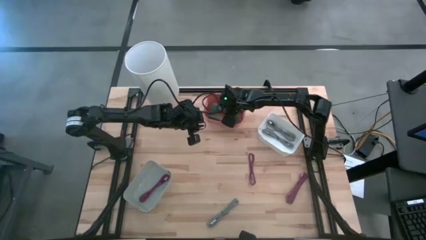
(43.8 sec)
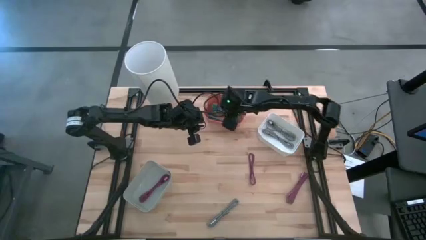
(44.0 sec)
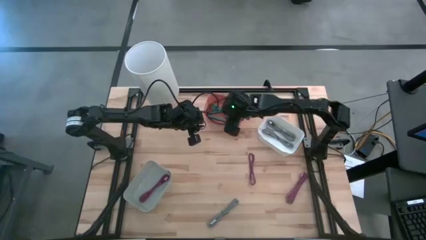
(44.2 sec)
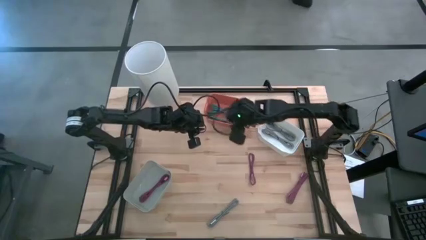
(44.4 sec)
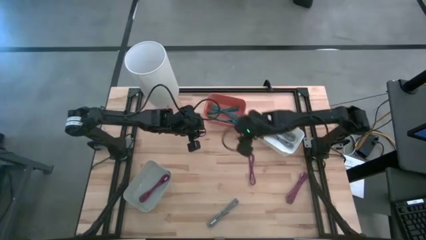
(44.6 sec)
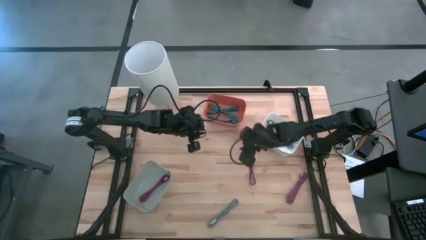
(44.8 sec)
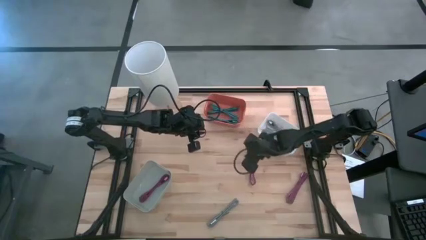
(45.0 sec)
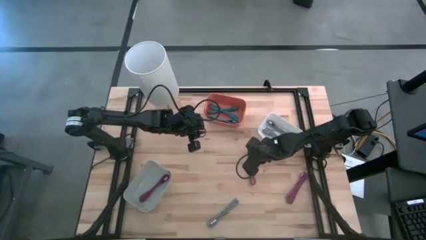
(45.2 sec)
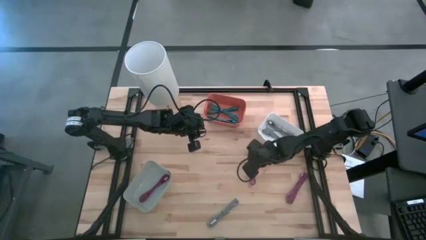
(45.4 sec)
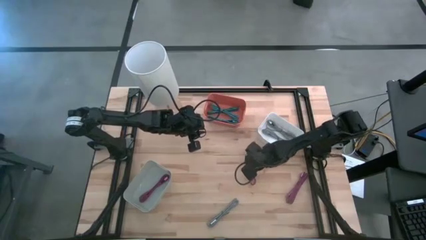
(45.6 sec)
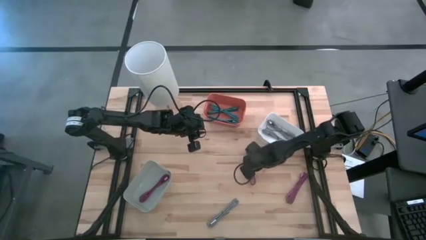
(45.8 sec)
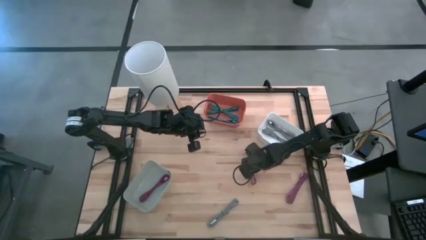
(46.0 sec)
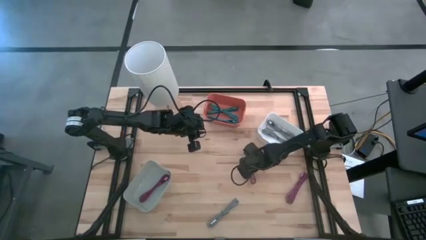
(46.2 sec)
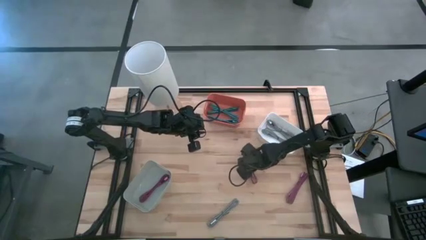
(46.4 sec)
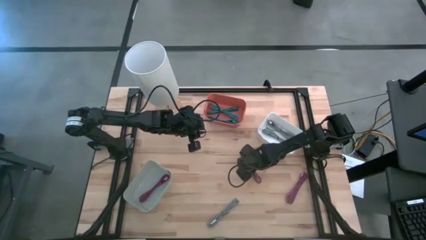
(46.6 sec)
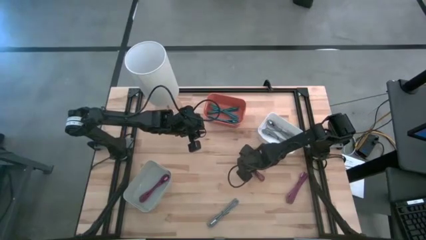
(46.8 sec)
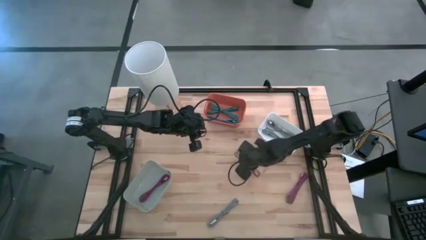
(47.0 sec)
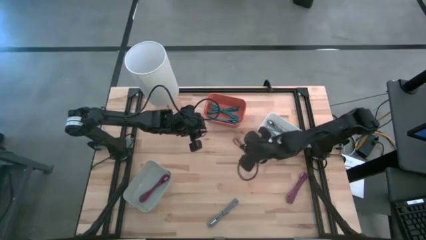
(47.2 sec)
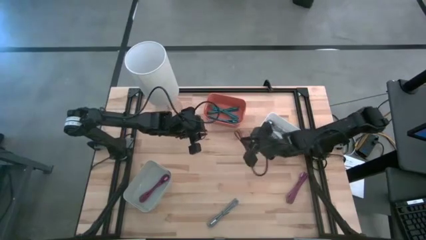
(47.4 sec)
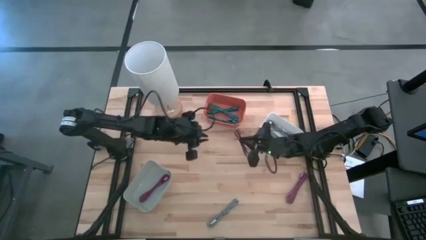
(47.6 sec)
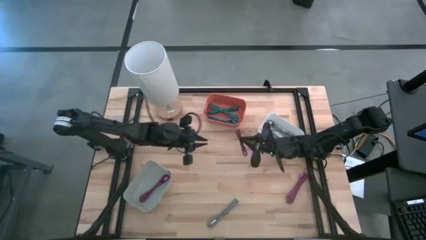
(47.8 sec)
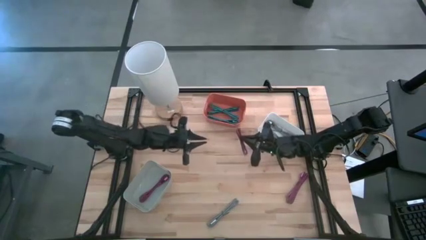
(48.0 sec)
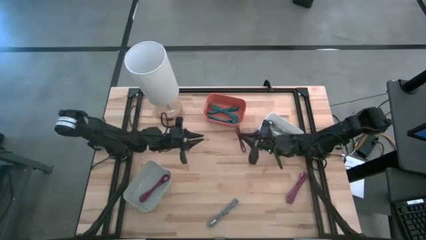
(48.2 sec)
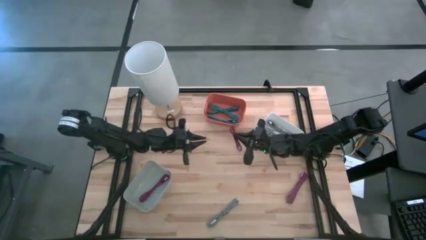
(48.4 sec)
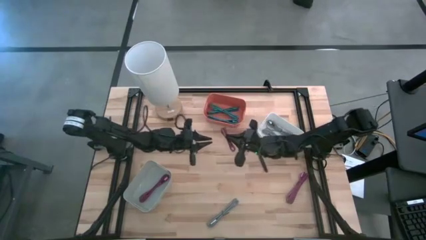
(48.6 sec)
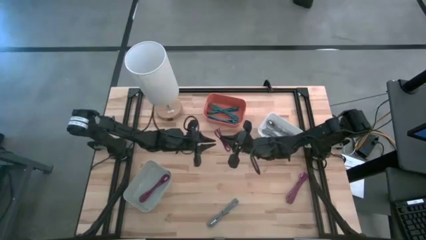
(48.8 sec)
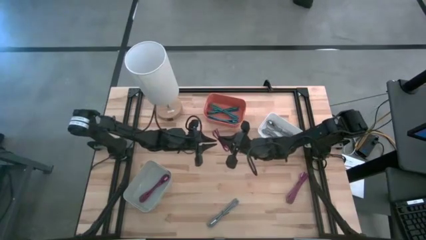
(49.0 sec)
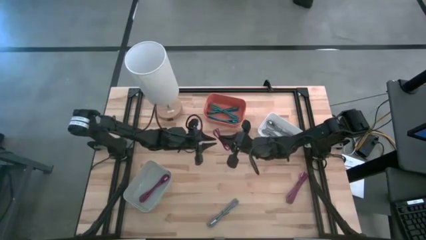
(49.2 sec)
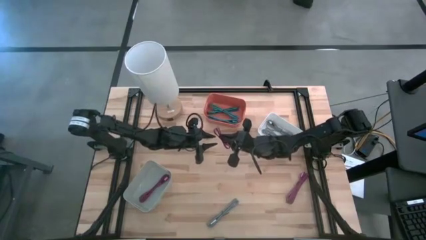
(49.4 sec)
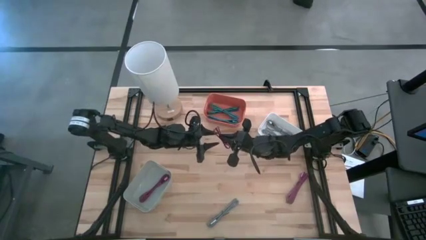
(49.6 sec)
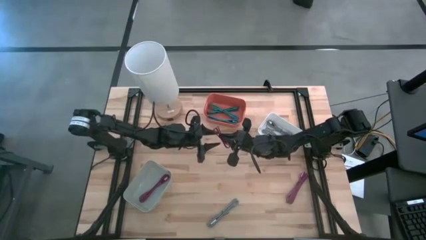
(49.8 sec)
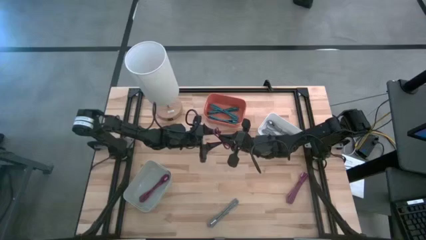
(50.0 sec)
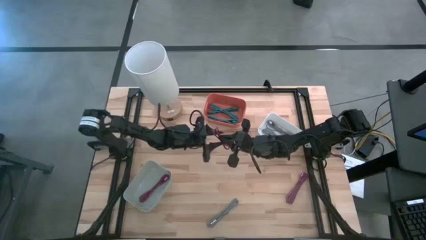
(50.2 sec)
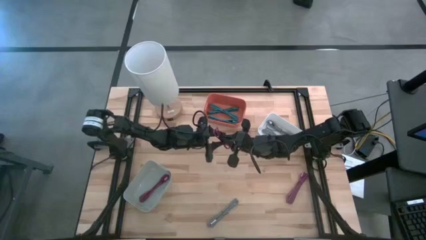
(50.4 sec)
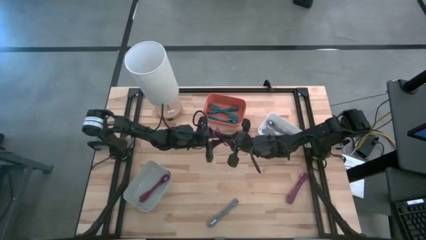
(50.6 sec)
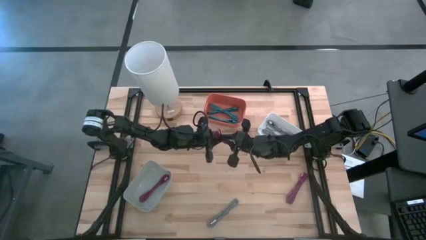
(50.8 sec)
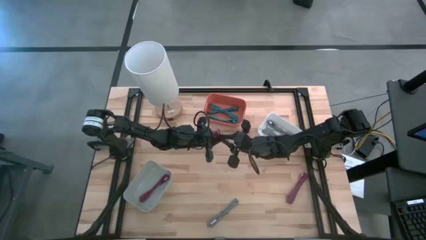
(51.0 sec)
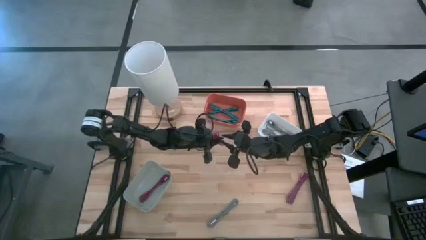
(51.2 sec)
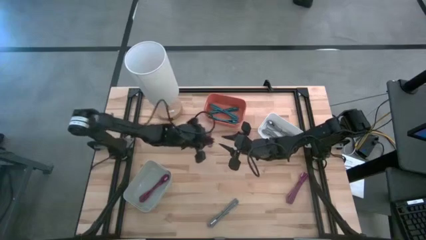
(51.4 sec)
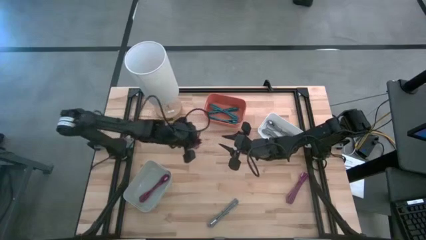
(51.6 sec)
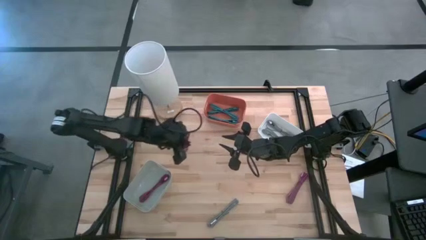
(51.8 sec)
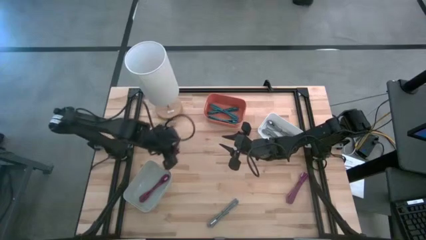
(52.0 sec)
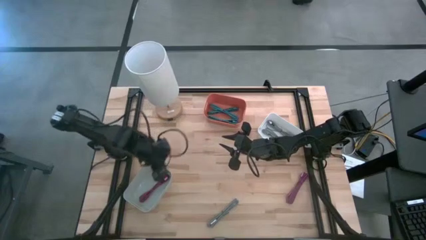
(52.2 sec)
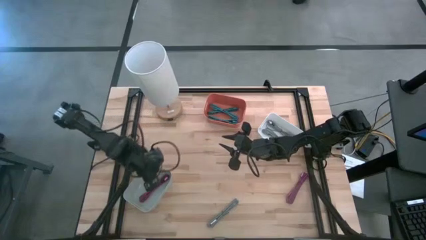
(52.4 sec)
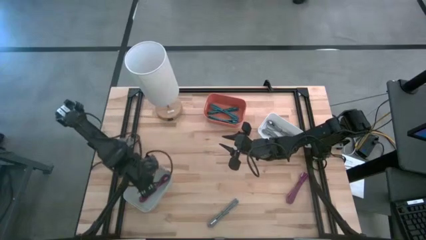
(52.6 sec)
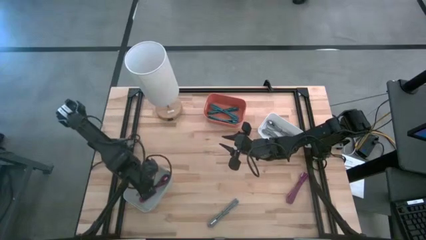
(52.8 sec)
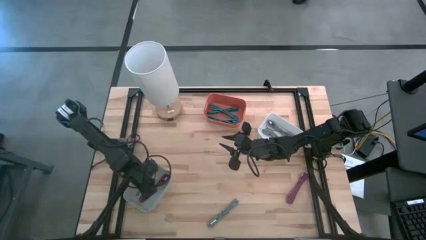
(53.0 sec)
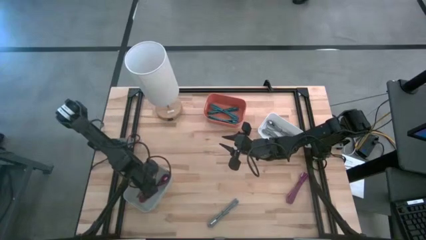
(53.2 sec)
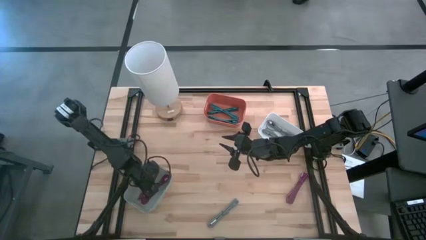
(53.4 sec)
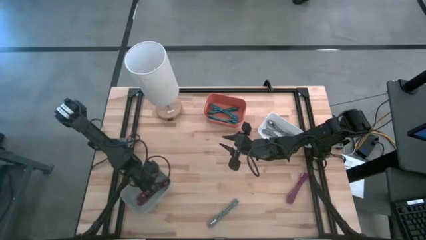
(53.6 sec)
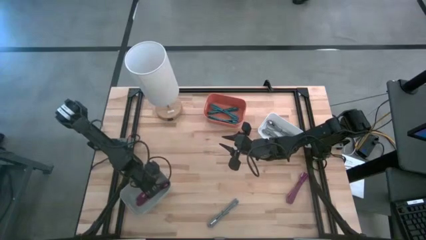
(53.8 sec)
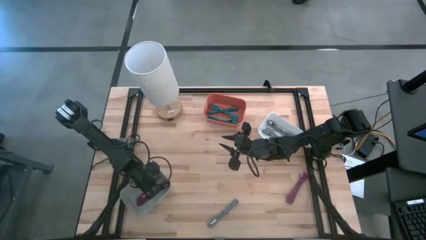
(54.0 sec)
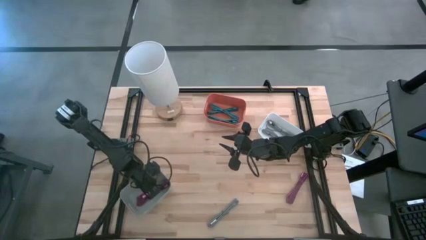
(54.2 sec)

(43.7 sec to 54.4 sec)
Task: Pick & Place USB Port
Put the left black and pink charger cable into the gray bin

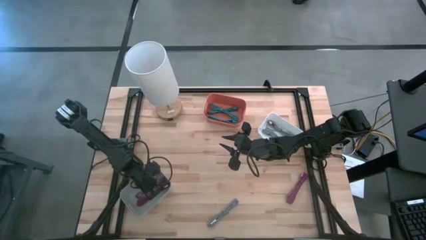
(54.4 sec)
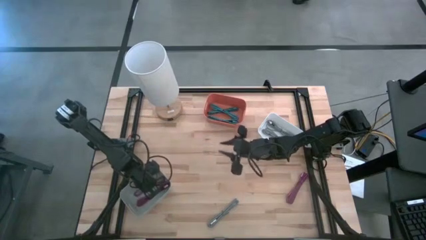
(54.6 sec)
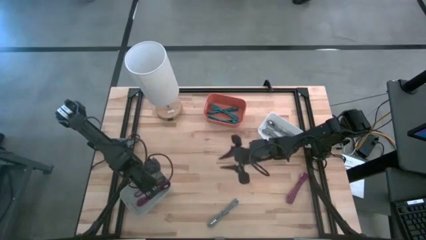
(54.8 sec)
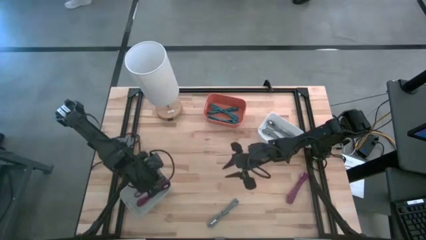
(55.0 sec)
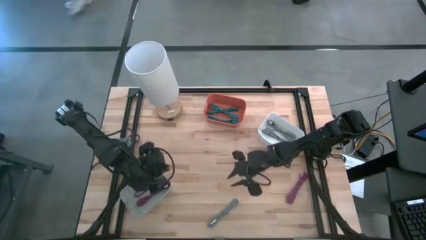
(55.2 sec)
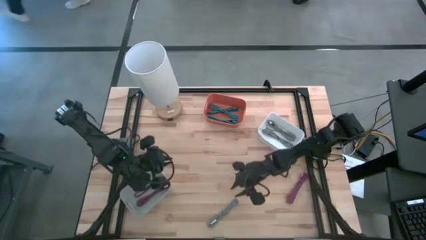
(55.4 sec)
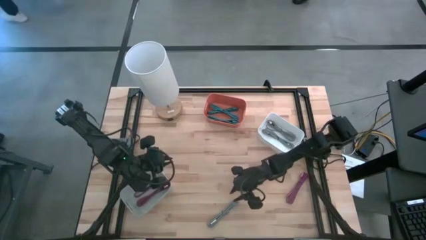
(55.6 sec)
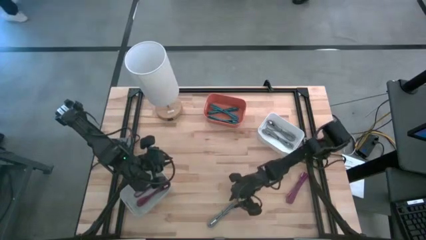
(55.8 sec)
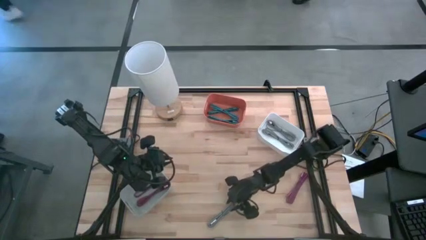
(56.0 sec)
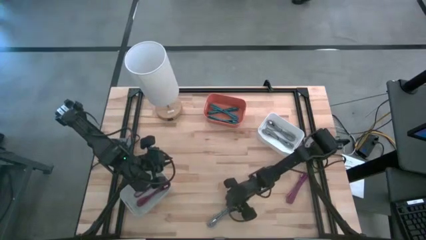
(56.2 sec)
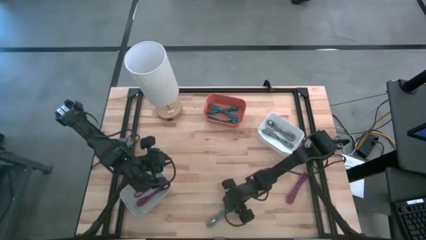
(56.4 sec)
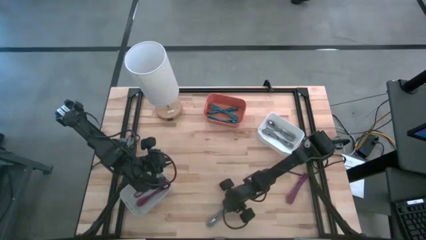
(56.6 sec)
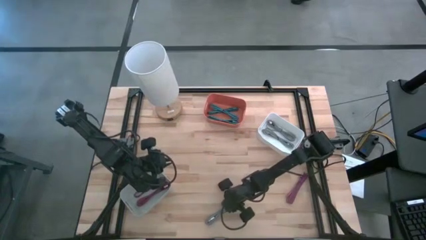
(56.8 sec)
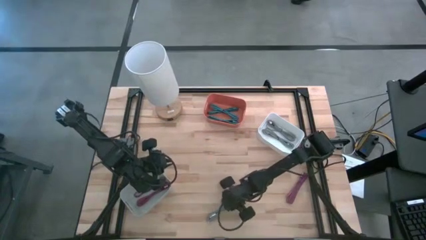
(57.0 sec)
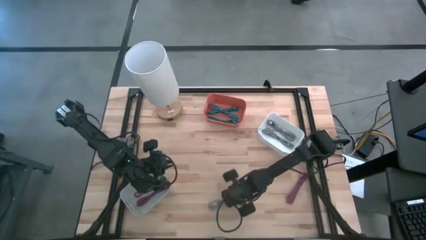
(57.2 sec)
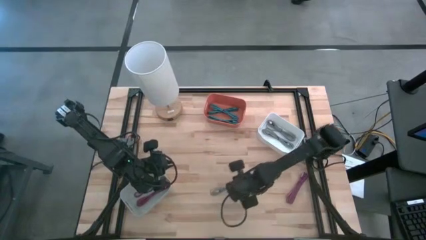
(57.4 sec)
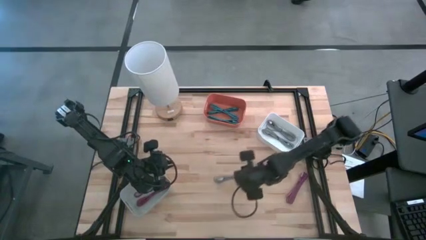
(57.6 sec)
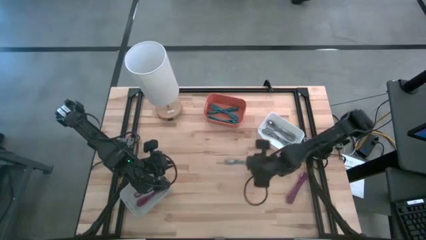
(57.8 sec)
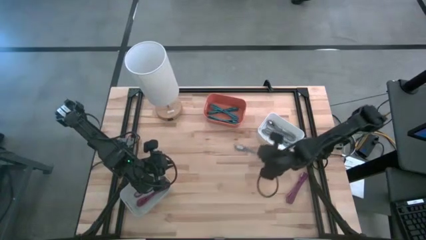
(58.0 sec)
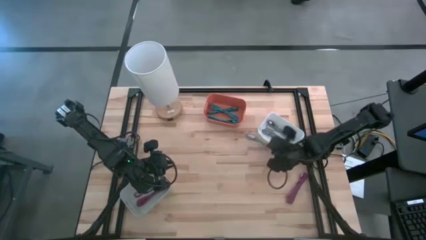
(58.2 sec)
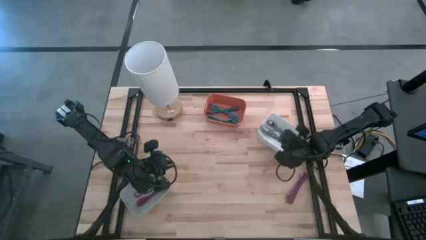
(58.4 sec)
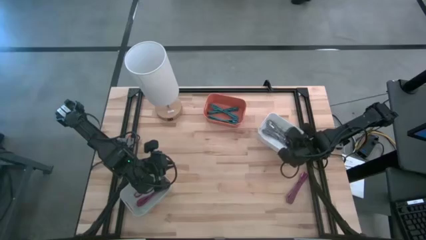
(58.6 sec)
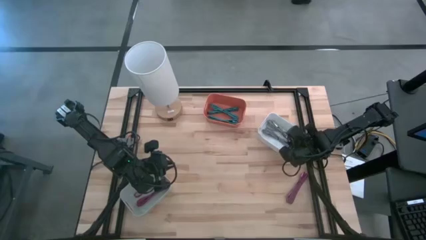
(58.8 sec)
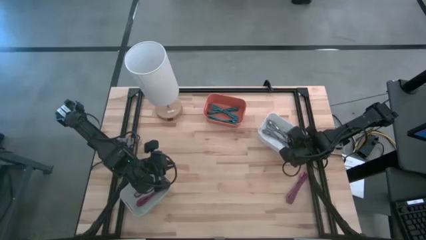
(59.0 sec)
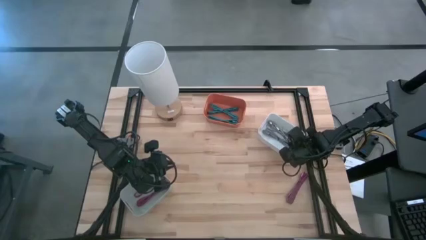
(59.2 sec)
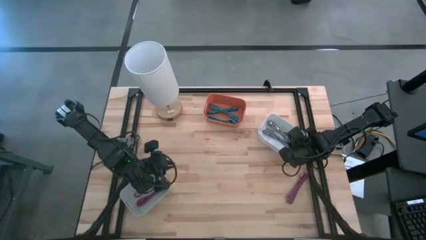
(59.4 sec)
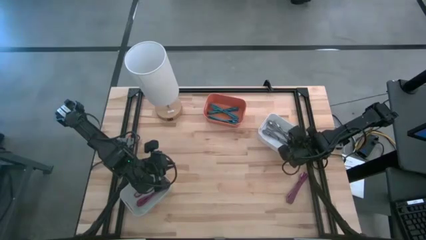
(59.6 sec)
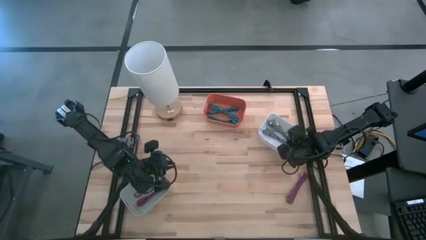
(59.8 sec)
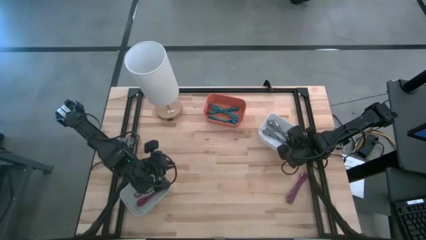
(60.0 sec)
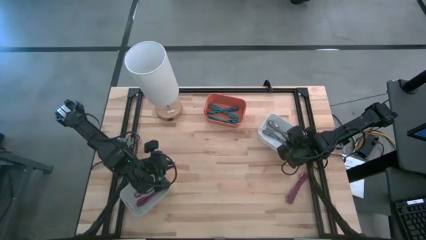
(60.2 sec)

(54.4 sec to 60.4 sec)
Put the white and black charger cable into the white bin
